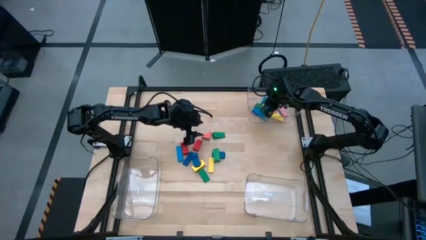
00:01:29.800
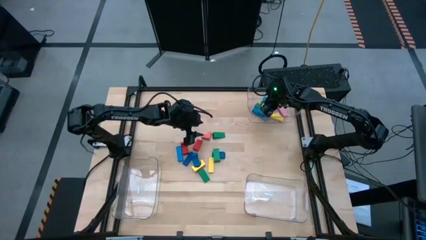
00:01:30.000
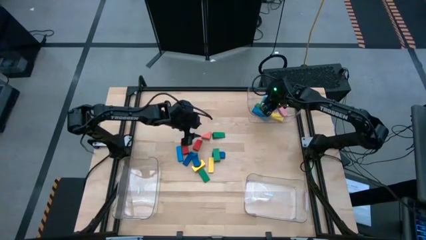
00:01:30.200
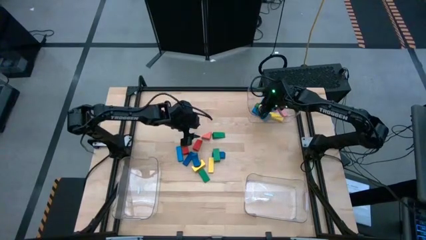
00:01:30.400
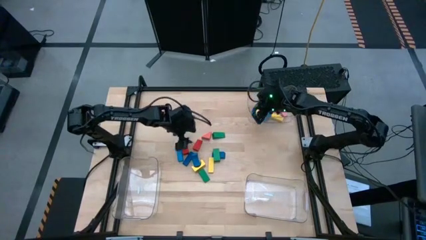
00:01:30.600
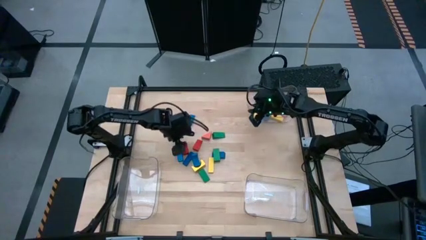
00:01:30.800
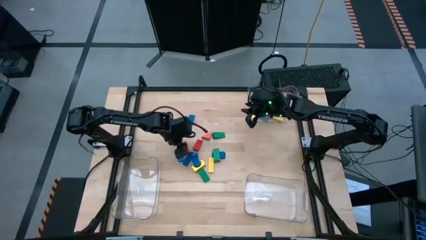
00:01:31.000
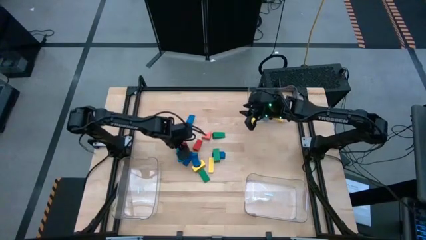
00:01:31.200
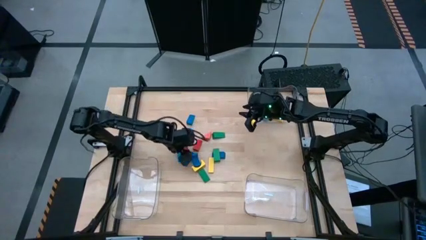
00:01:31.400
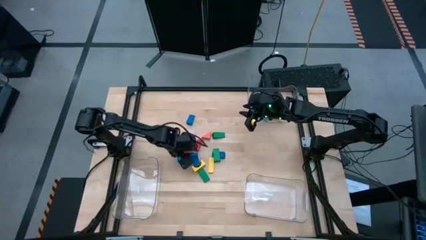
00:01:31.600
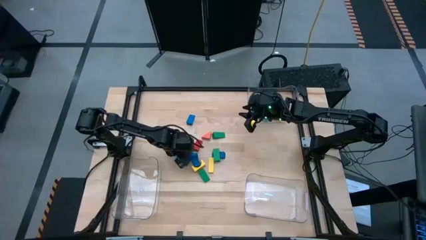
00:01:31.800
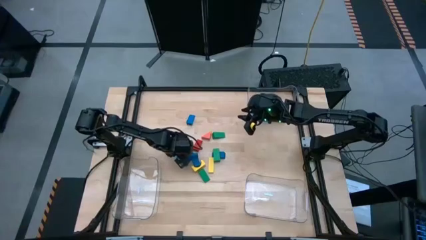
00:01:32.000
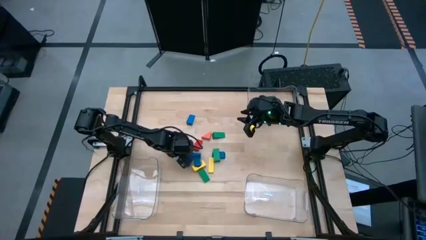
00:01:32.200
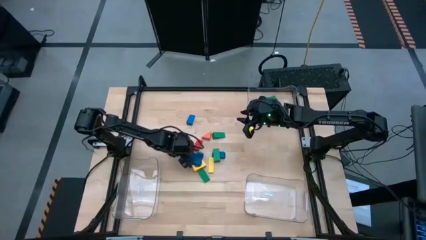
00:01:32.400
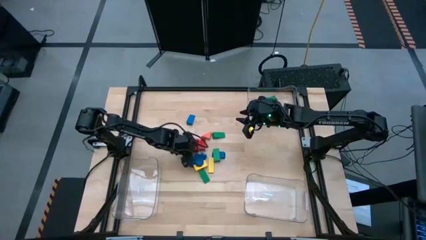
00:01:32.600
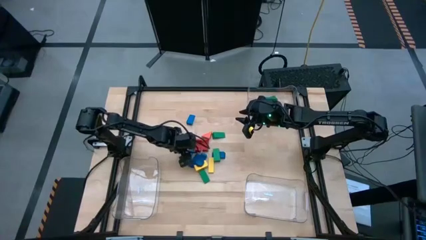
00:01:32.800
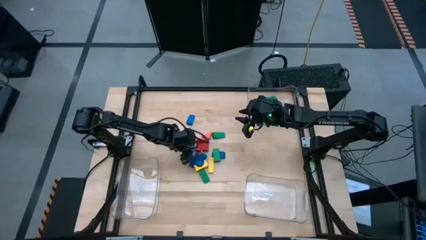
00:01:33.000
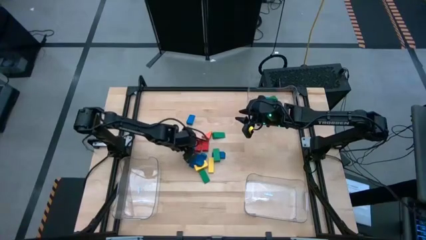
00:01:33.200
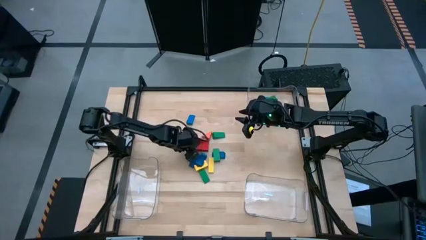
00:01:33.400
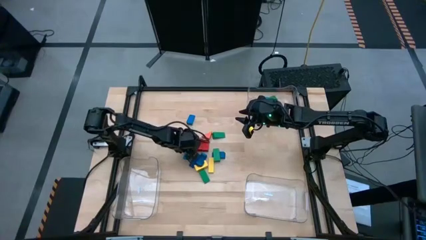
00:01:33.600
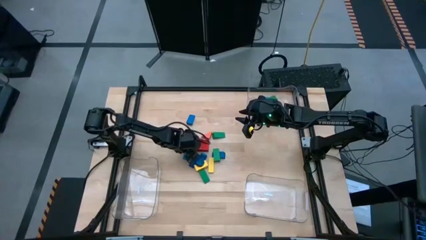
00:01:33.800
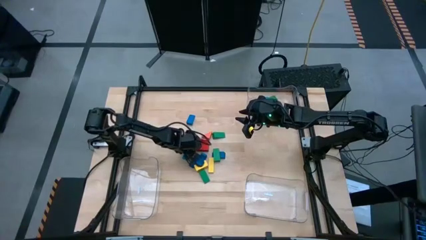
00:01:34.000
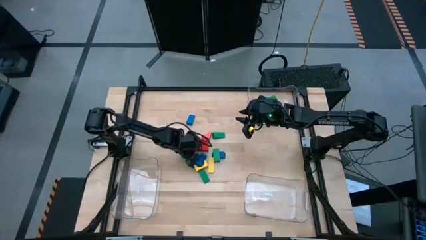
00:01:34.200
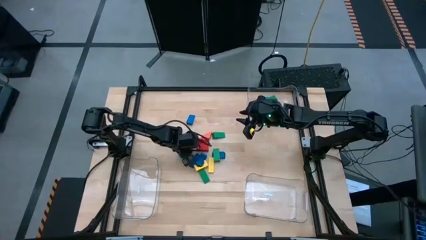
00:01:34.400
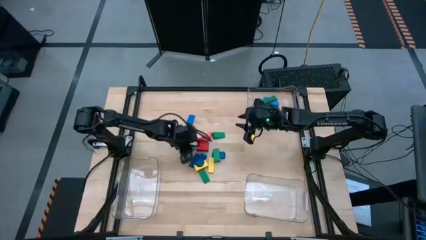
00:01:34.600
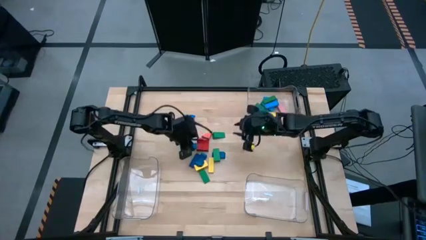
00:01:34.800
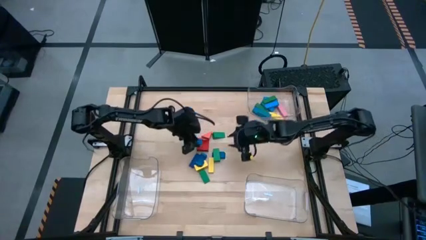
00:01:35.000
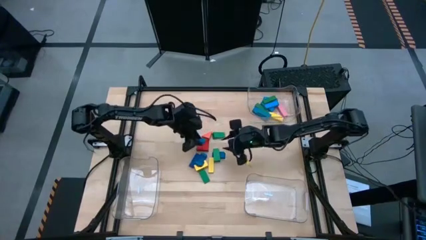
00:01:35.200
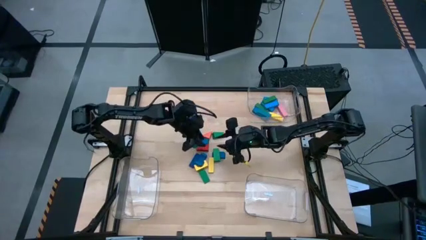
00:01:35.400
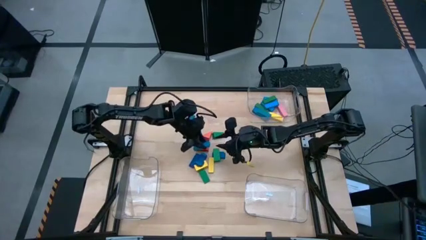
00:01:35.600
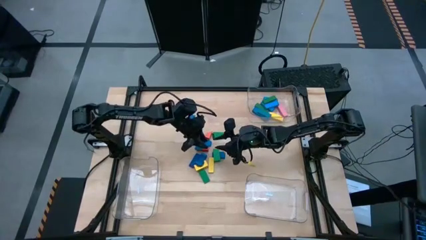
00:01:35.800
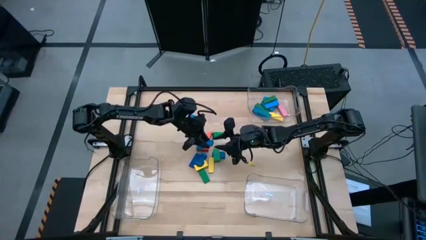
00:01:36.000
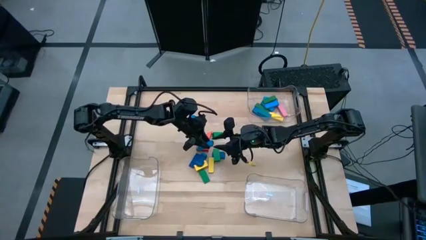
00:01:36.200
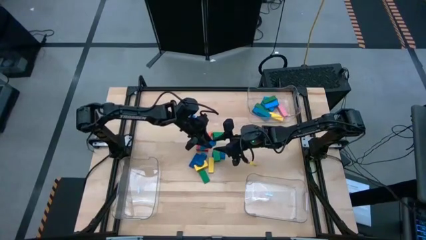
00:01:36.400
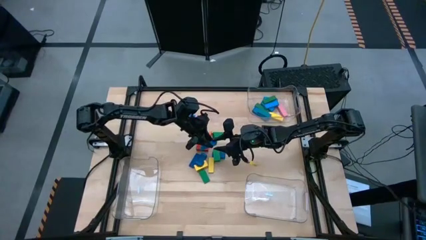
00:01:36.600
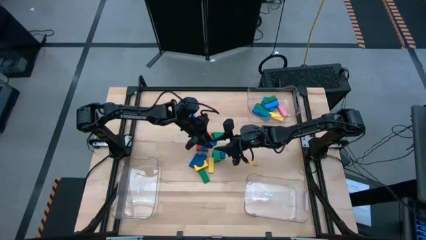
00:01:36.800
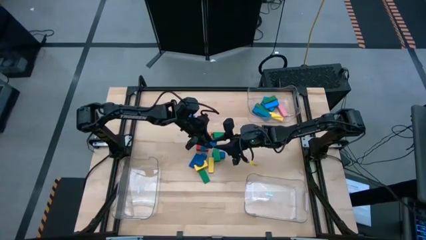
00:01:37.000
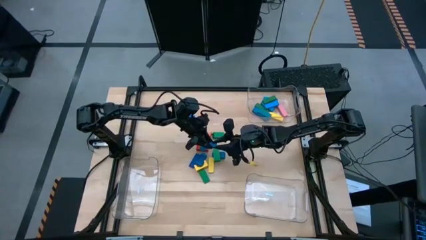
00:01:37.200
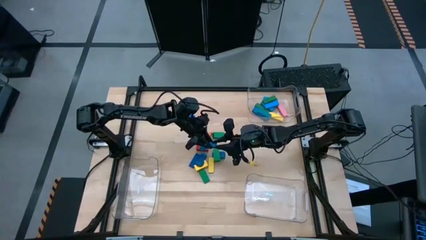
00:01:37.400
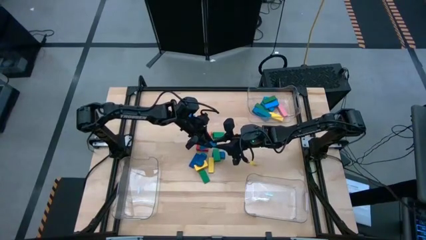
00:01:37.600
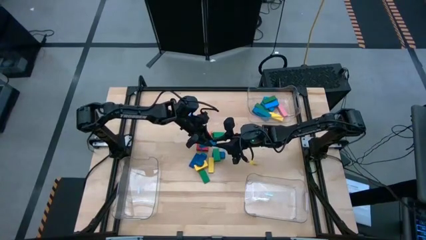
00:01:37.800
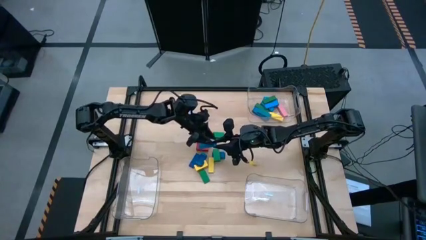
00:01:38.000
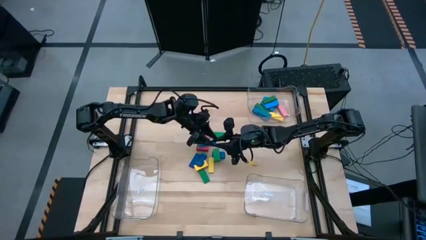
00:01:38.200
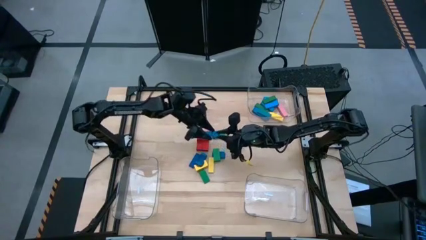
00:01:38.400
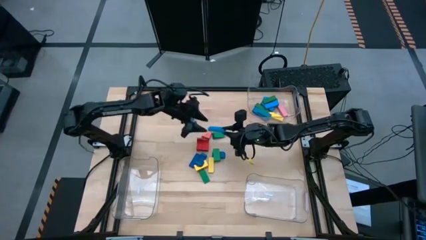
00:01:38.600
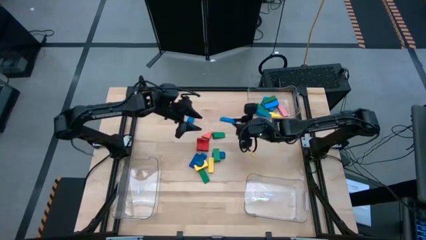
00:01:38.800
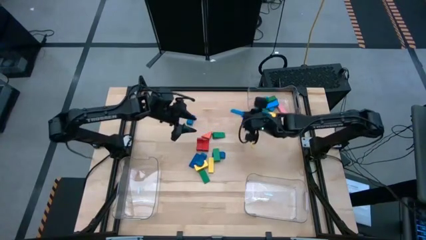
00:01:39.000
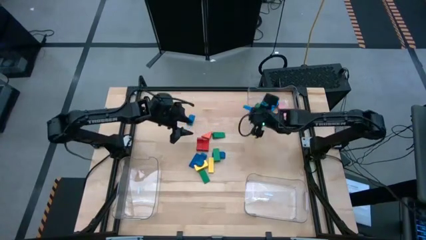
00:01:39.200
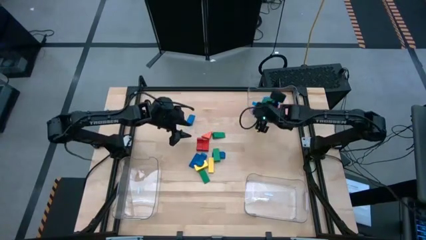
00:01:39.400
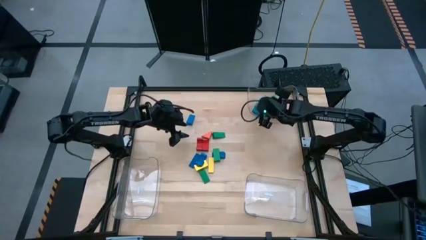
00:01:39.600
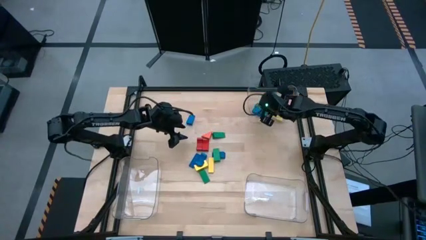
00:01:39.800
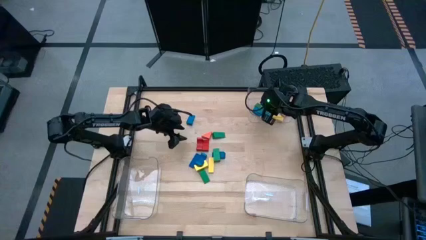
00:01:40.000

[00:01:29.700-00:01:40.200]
Task: Sort blocks by size
Put the blue rectangle block into the top transparent bin
